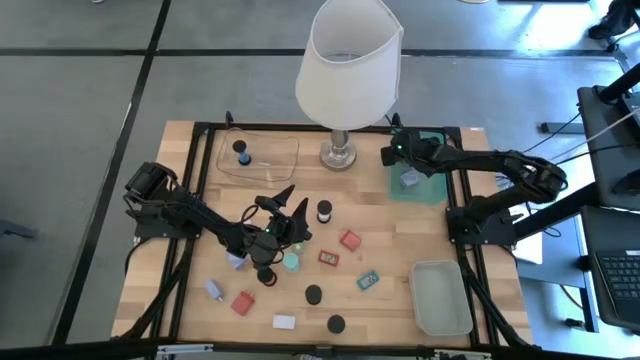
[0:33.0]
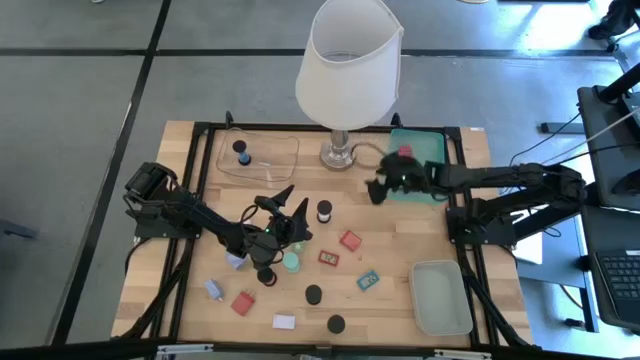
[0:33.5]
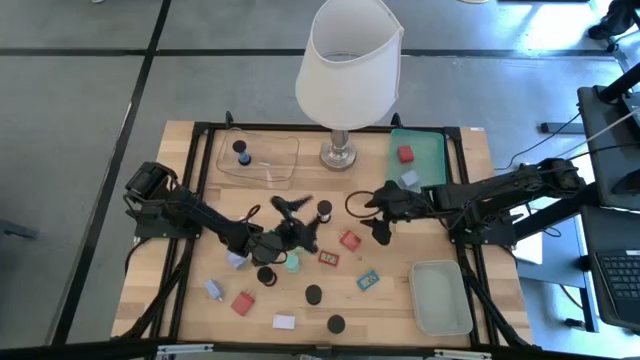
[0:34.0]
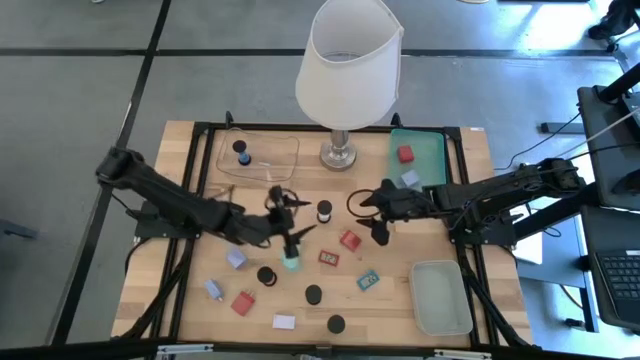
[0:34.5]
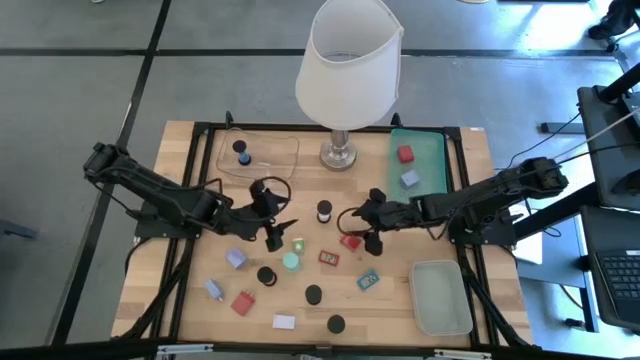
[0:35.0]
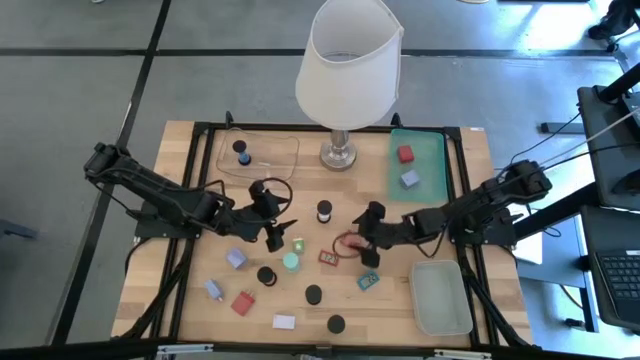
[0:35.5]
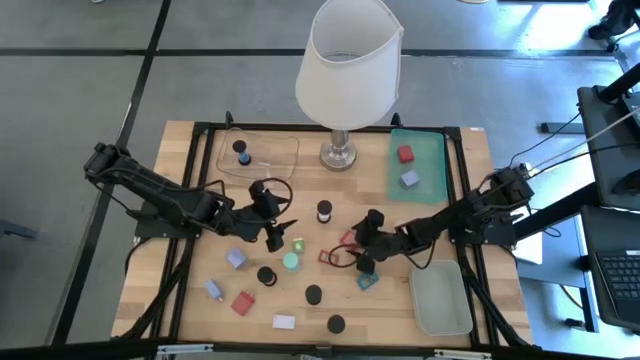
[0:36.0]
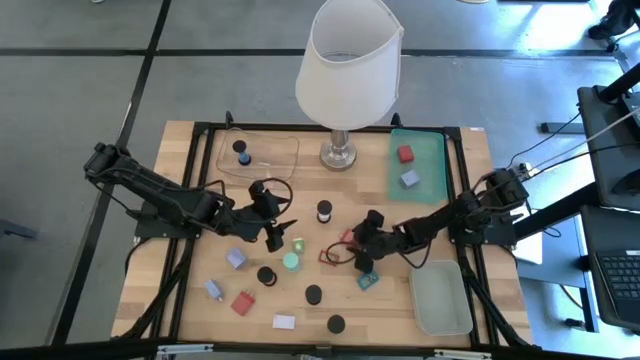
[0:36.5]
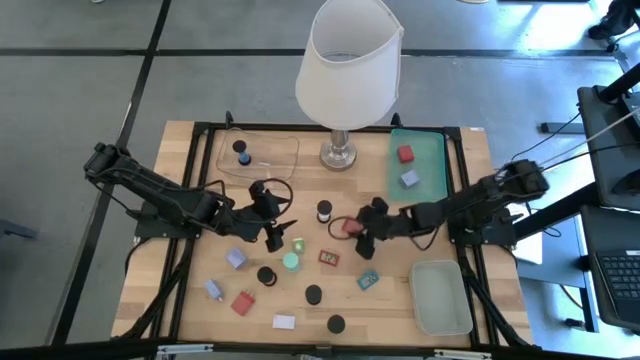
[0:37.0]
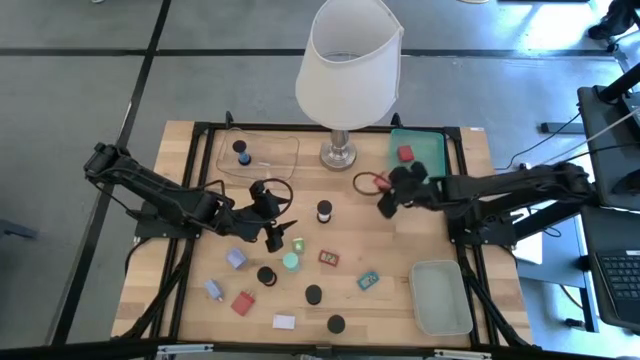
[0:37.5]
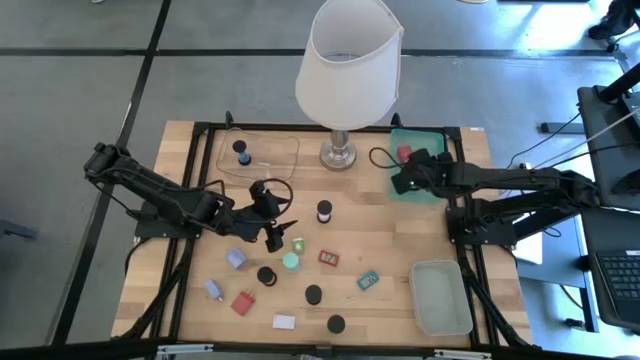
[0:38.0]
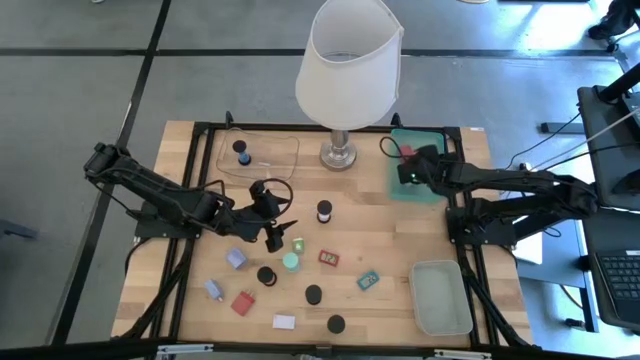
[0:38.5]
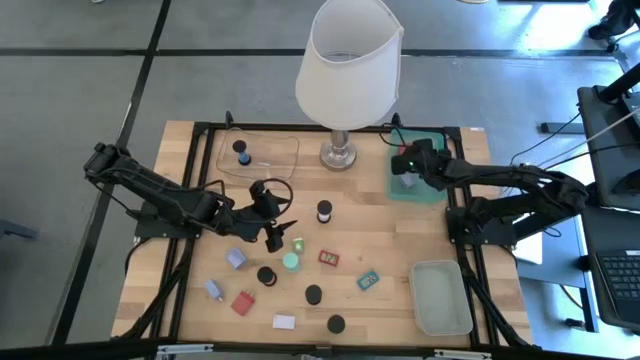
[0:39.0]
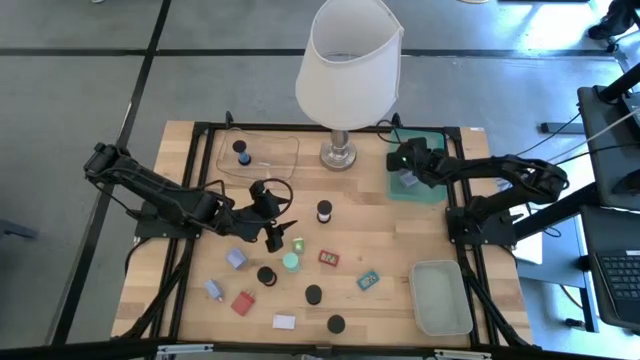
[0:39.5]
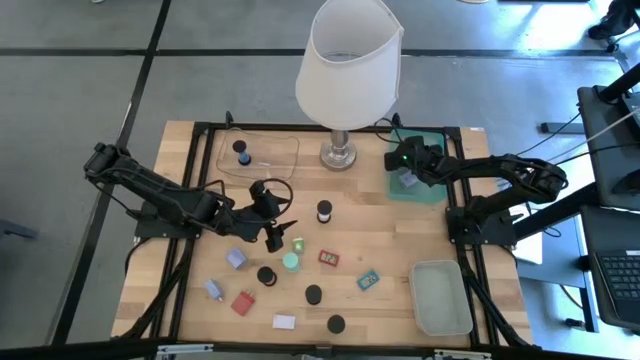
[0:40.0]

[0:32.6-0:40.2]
Task: Pick & Place Office items
Put the top red charger adapter into the green bin

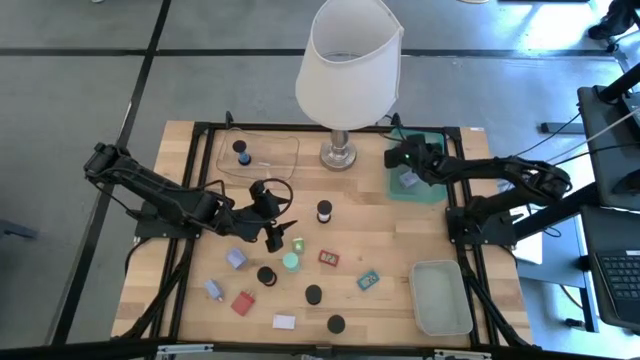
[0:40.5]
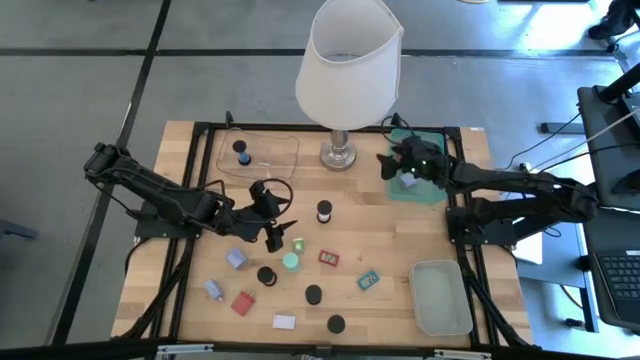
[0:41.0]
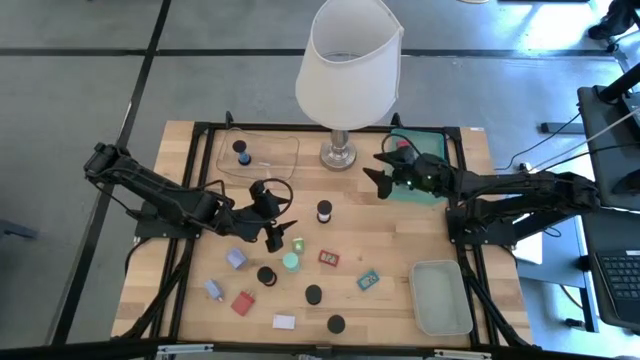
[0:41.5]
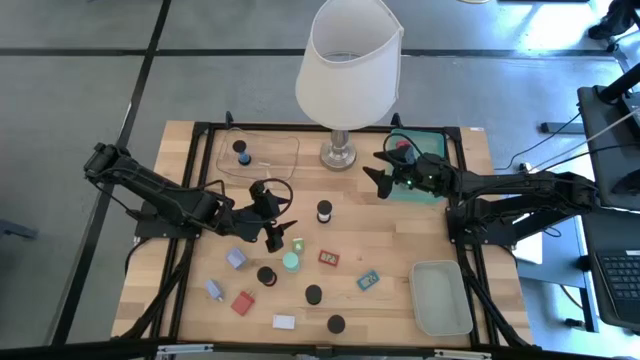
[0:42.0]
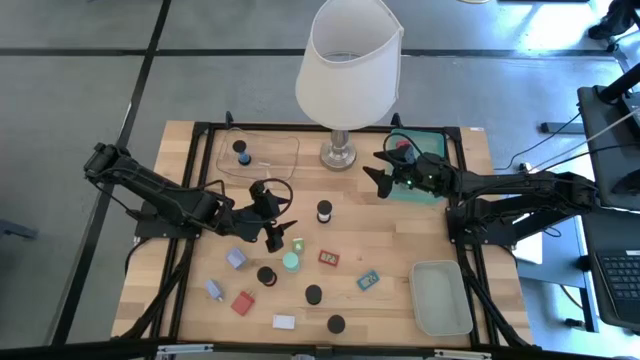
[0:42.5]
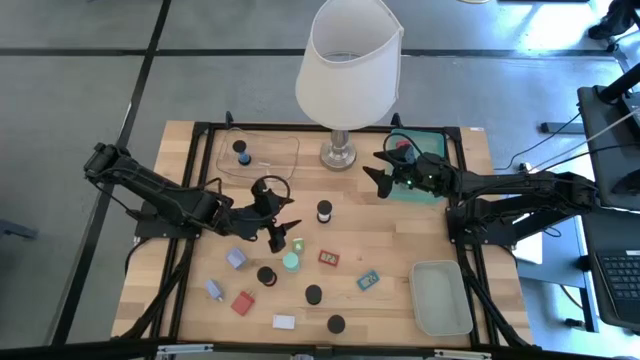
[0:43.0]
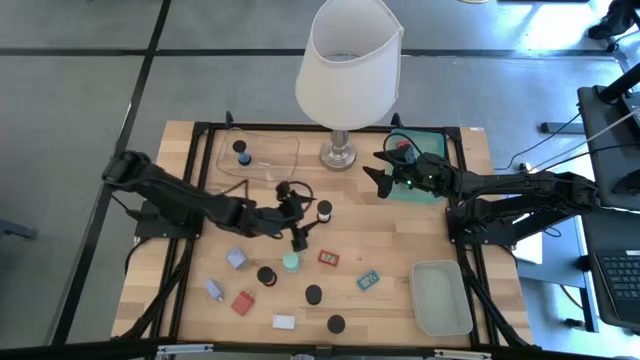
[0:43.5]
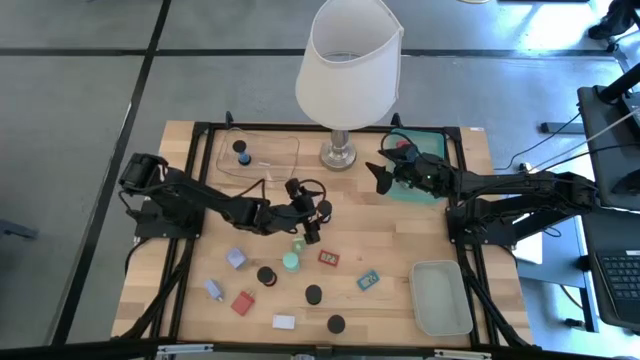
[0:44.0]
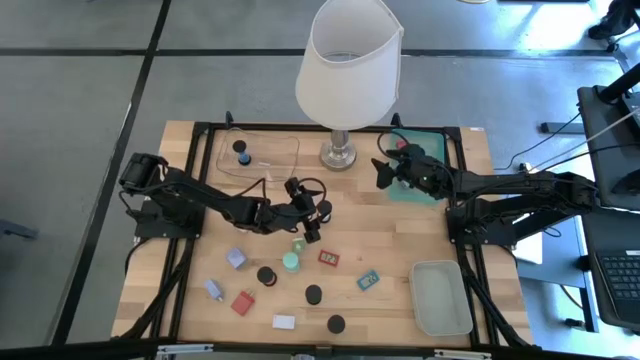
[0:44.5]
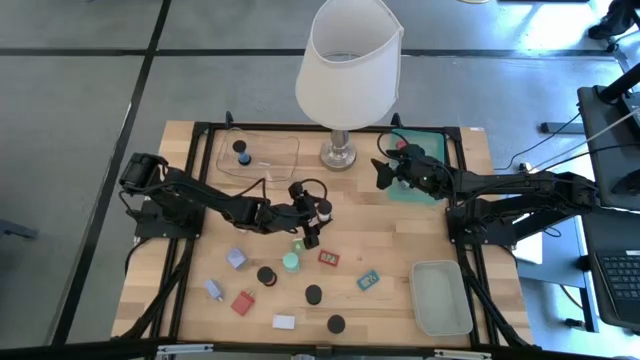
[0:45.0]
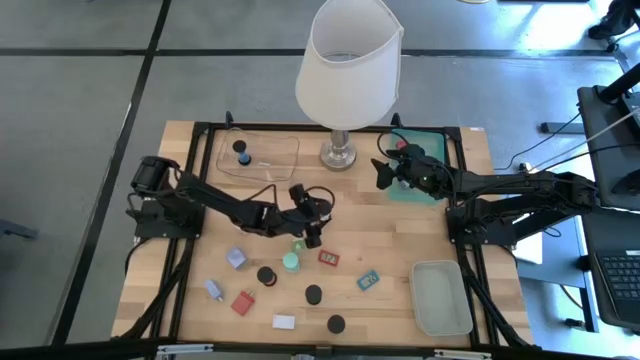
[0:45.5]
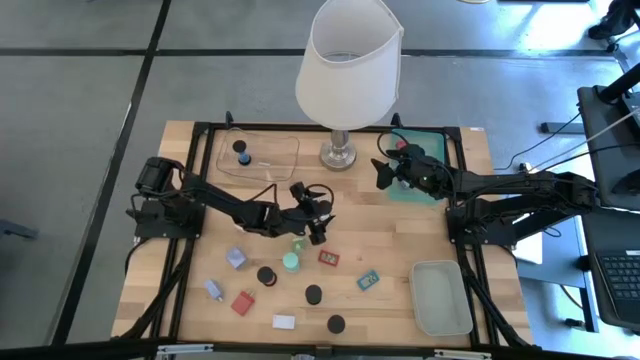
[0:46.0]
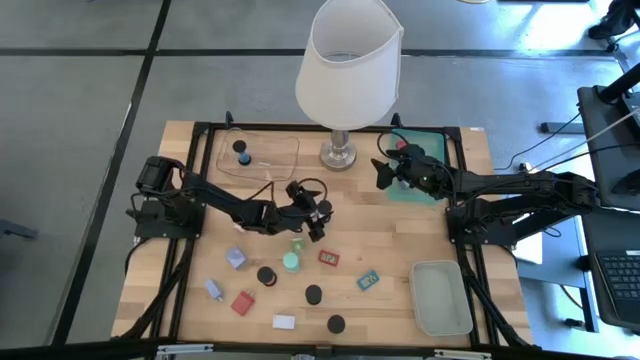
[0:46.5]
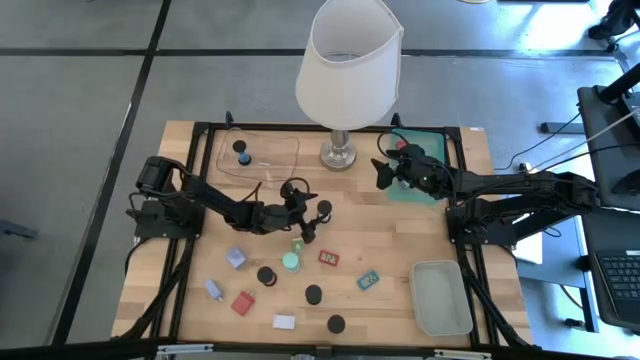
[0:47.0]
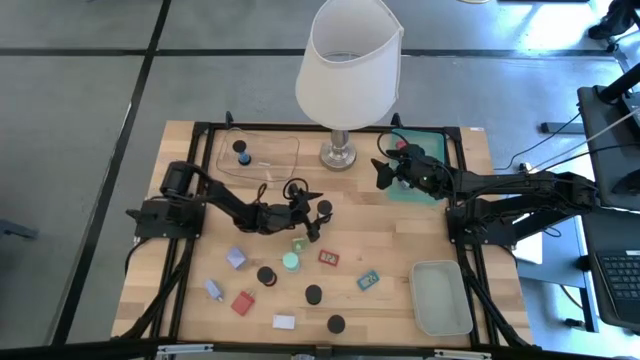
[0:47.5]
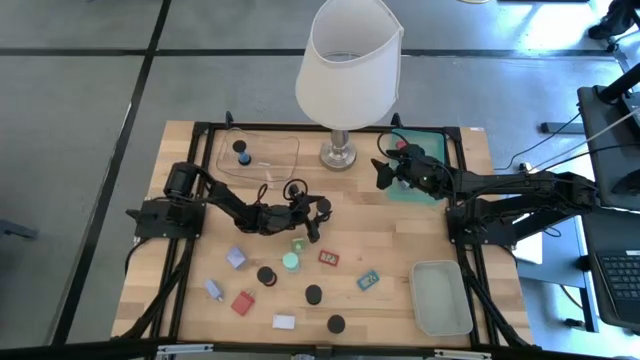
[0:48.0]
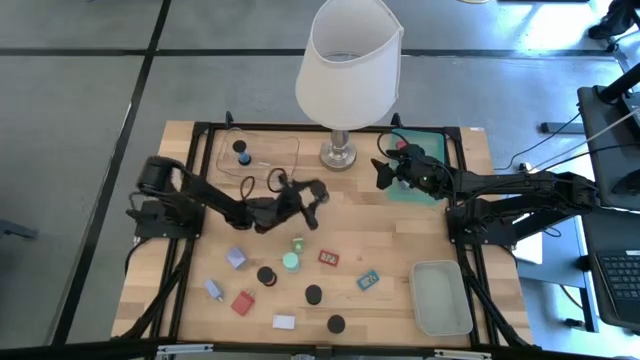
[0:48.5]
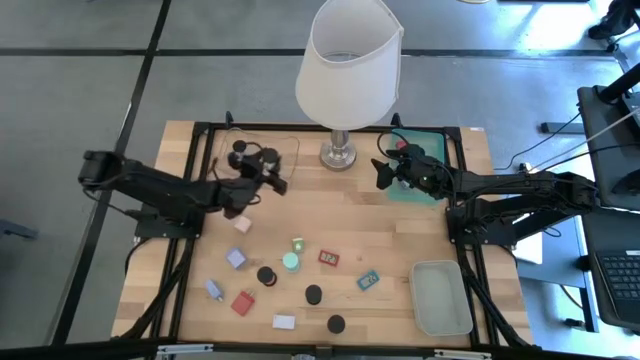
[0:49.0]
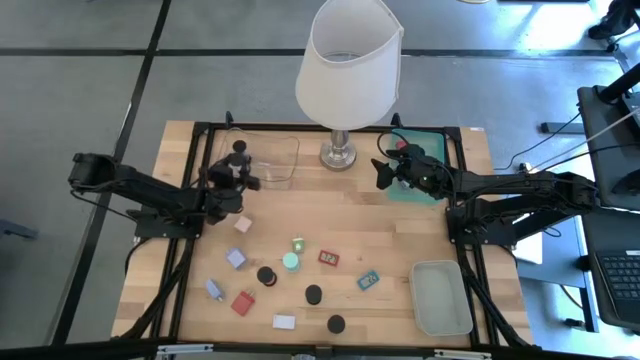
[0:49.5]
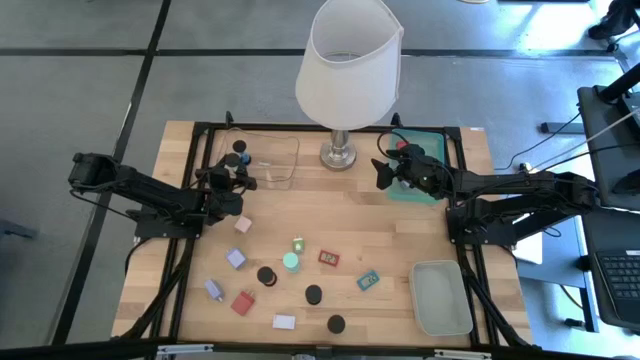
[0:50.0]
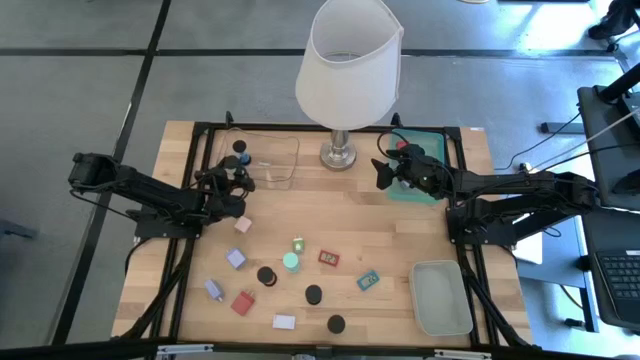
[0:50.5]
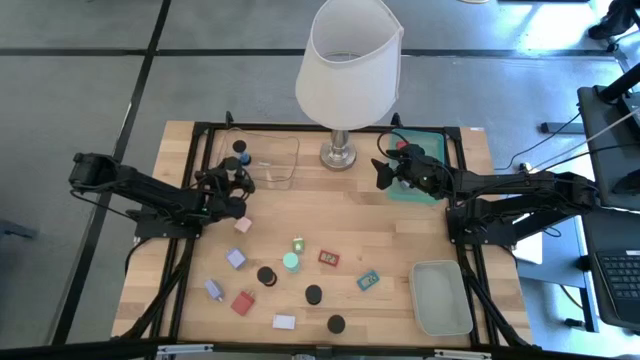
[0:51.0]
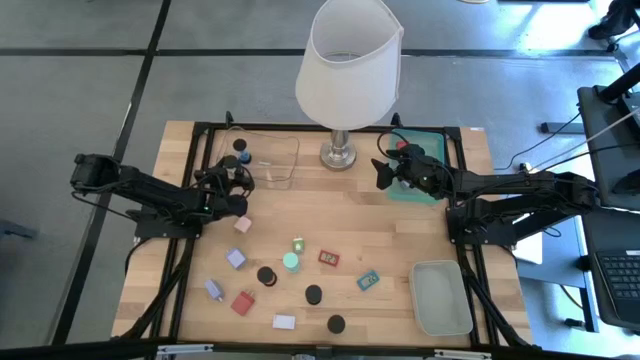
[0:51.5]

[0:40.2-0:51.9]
Put the light blue hourglass into the transparent bin

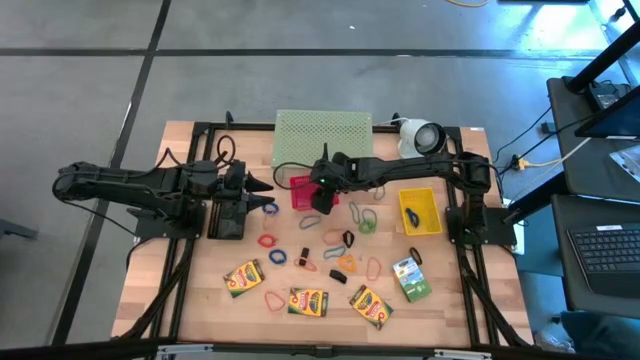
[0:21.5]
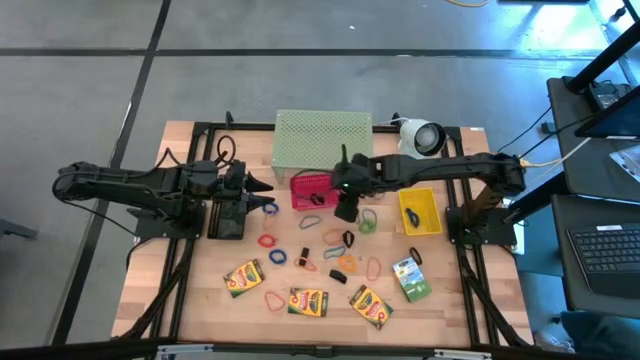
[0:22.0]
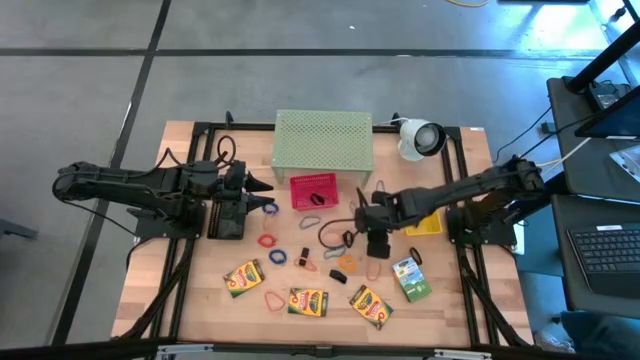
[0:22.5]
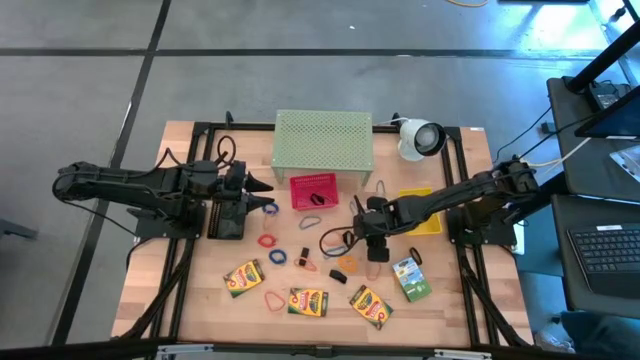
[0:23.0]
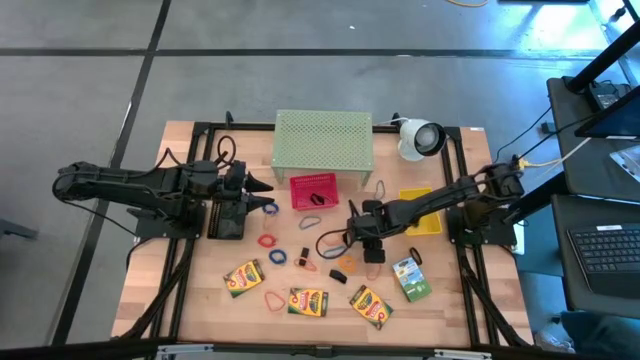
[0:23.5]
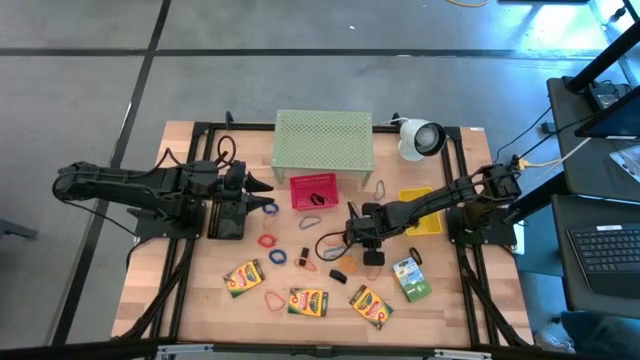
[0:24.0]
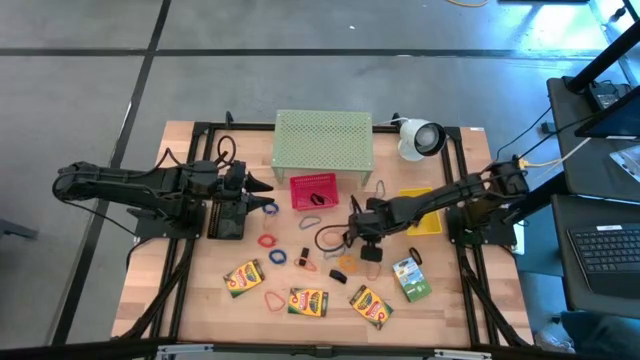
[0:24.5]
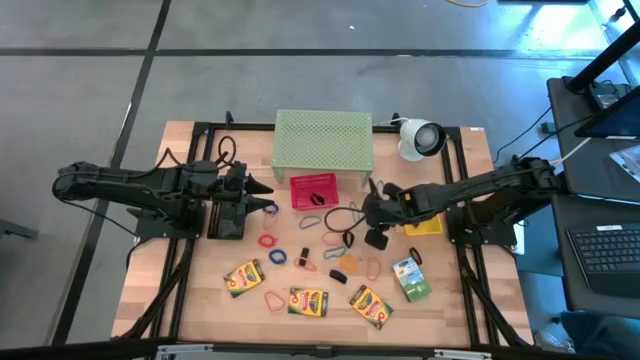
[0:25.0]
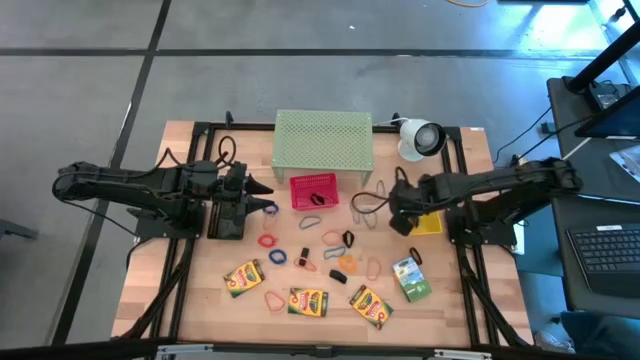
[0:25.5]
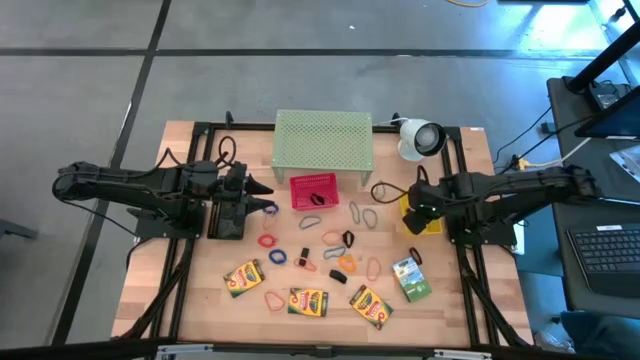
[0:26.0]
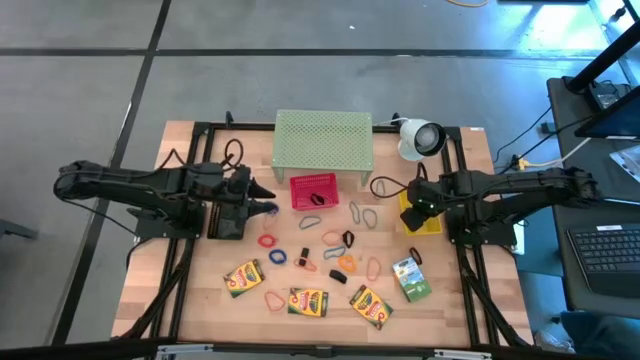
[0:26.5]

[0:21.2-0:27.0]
Task: Pick & Place Office Desk Supplies
Put the green spring keychain into the yellow bin
